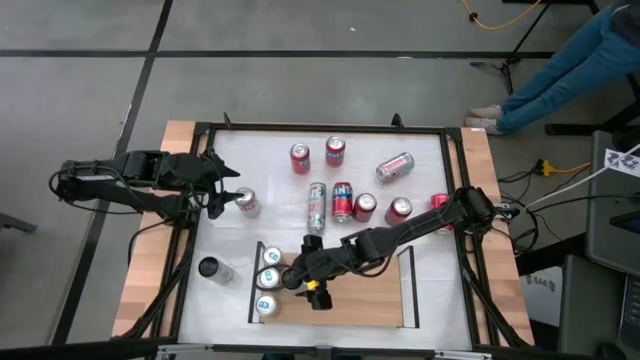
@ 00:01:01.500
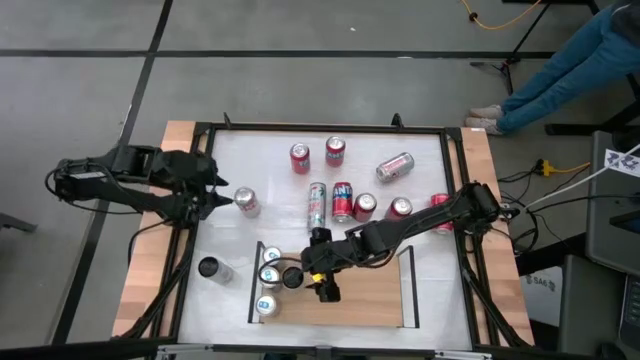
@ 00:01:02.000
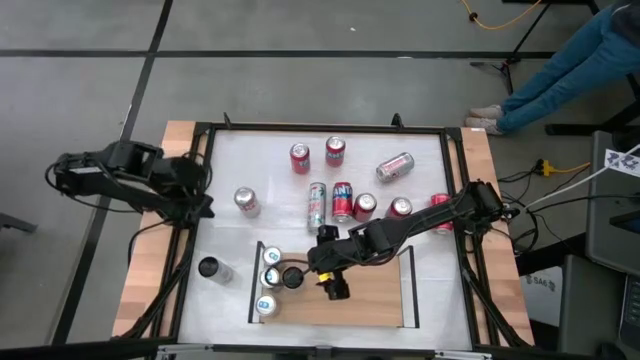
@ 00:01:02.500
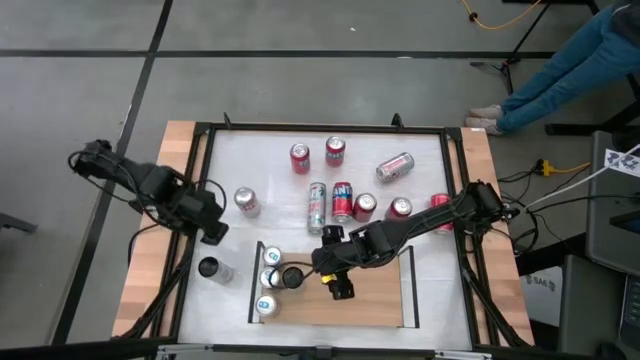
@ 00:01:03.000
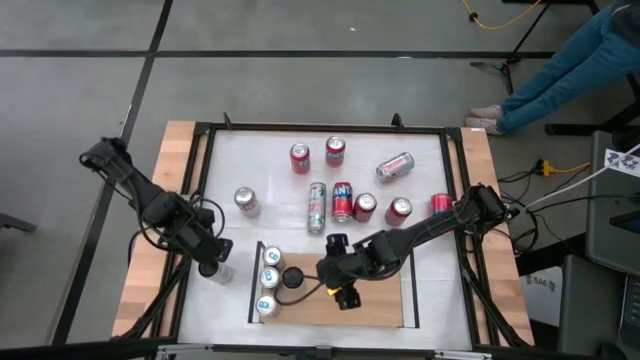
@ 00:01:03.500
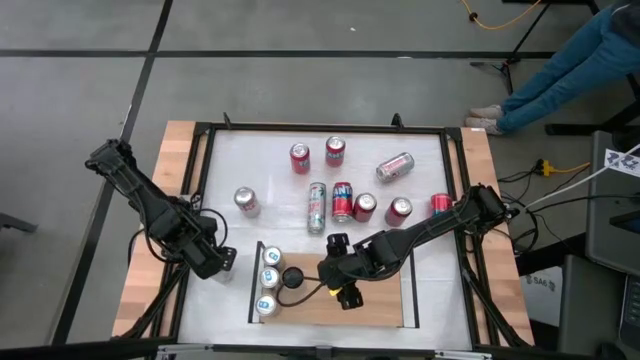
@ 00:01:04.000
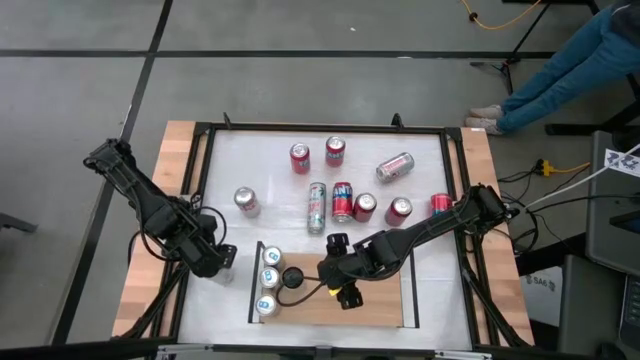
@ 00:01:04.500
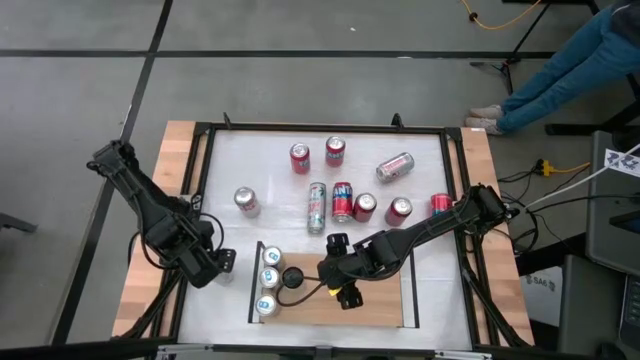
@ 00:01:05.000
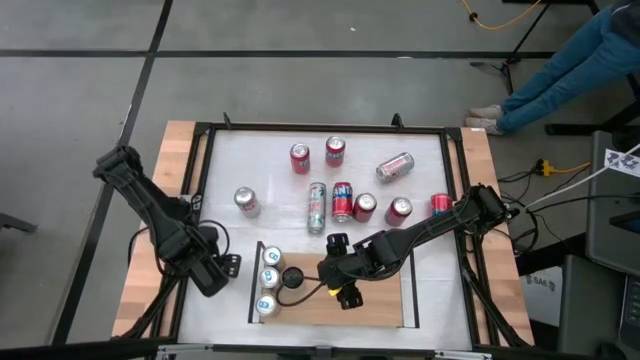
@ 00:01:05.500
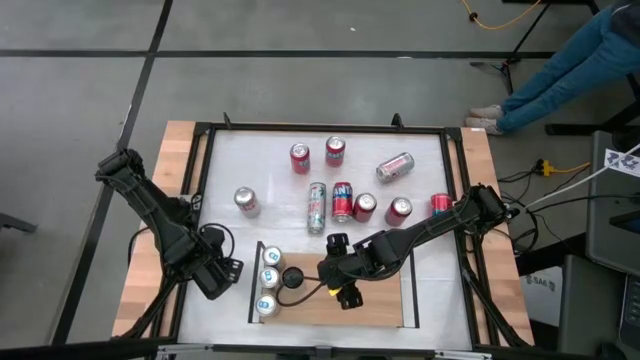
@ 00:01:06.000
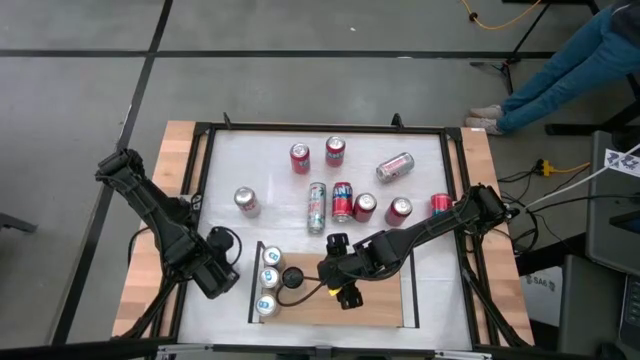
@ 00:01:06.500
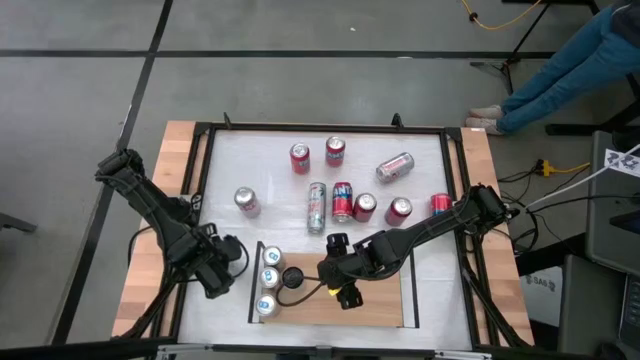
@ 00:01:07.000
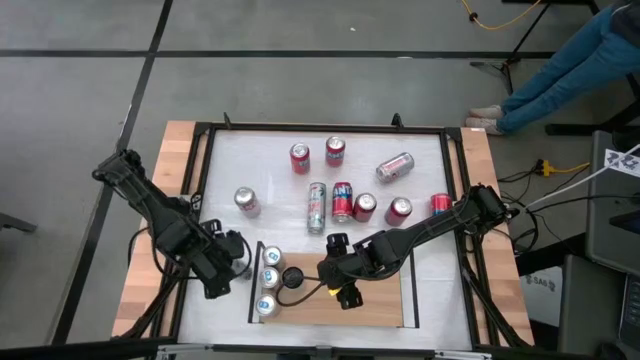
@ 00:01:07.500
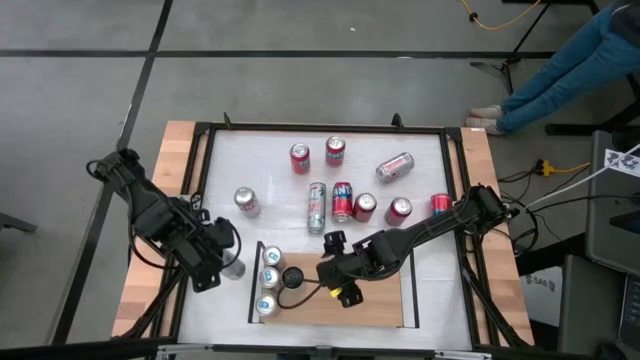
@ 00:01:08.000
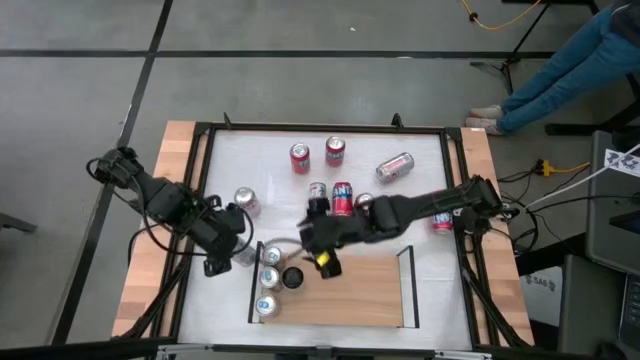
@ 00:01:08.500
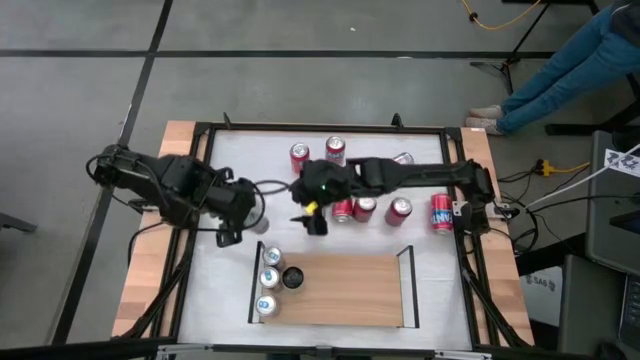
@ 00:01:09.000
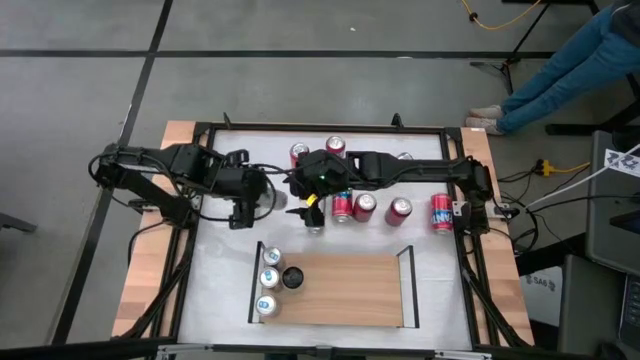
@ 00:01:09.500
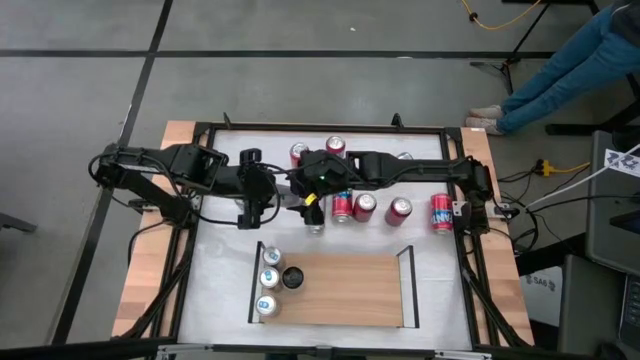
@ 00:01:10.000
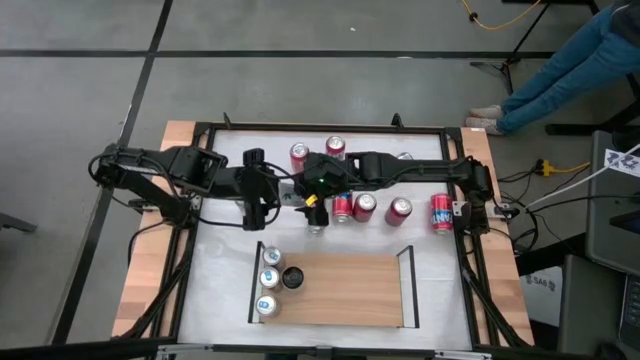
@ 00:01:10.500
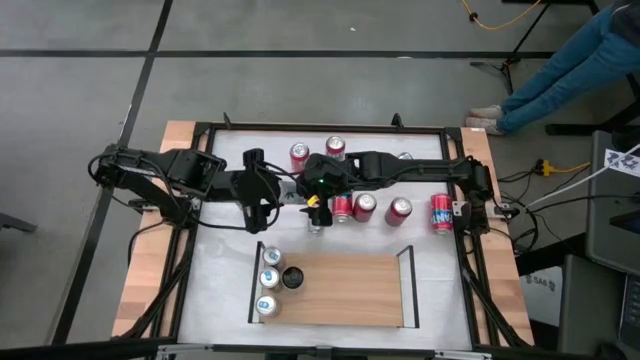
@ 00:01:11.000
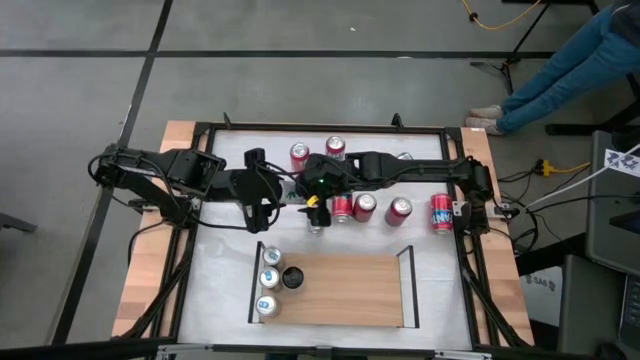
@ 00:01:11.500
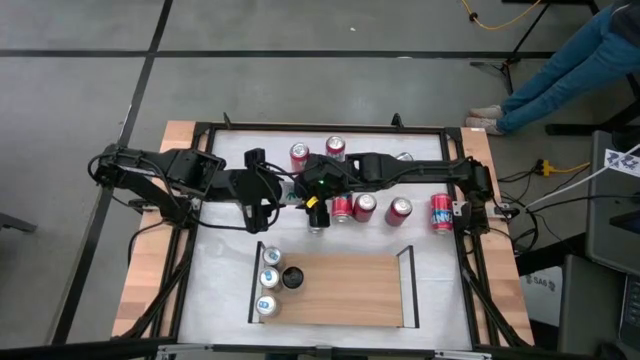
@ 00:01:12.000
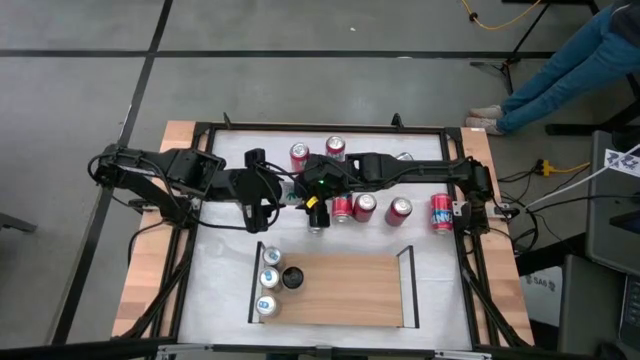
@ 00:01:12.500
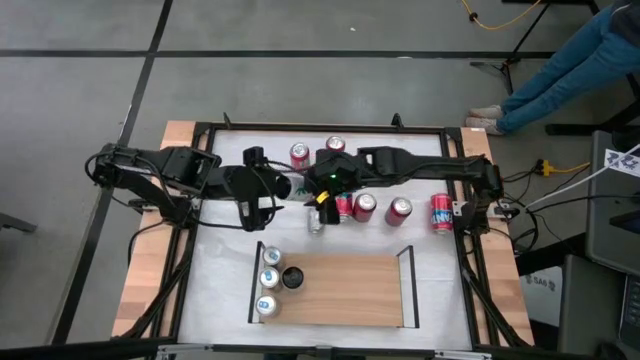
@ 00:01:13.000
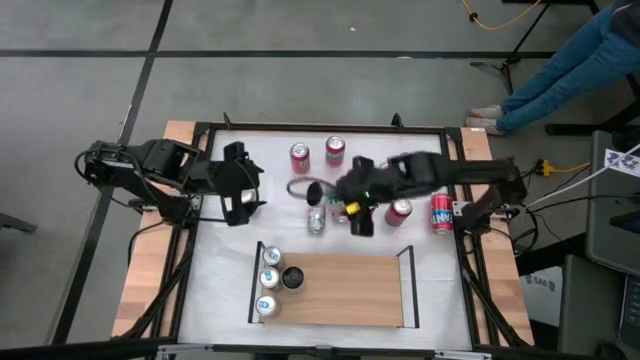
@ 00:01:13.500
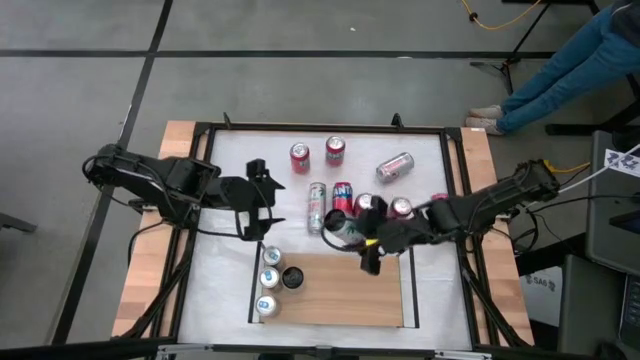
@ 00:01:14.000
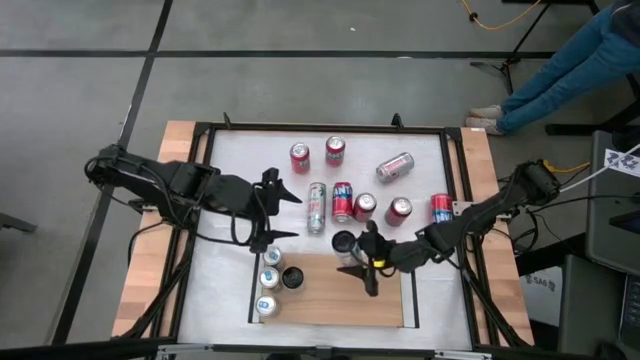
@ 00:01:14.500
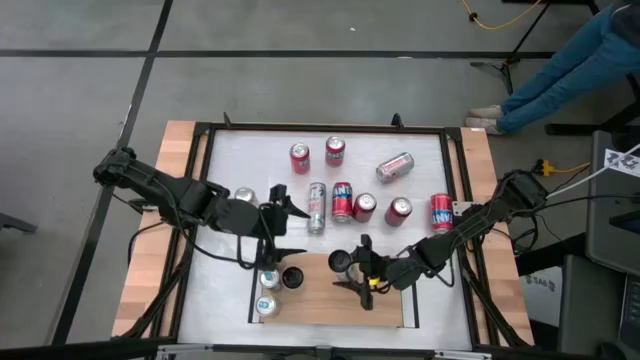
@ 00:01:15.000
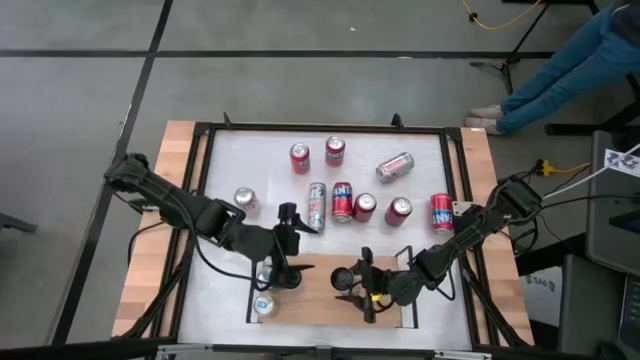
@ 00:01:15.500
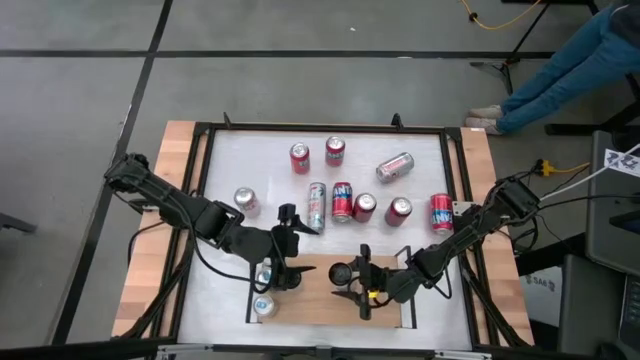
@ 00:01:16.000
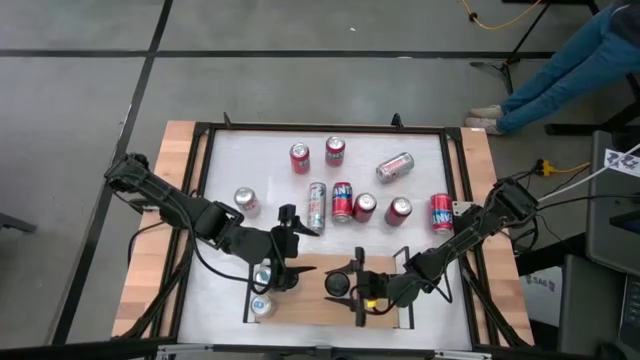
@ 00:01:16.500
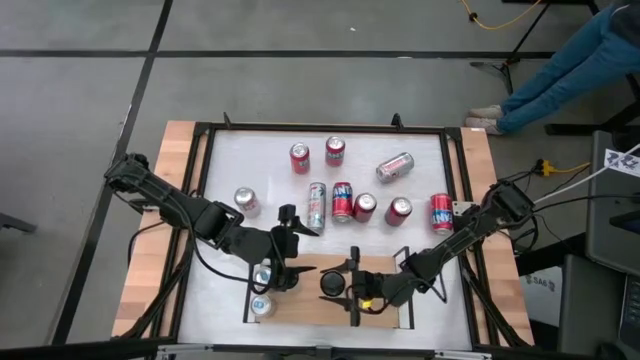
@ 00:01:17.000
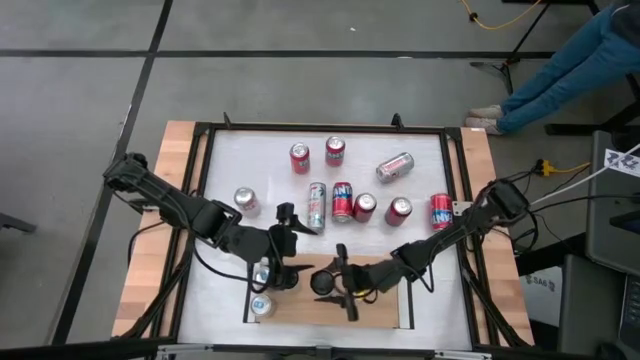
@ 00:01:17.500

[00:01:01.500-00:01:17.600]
Task: Place canned beverage on shelf
Put the bottom left white soda can on the shelf aligned with the other white soda can
